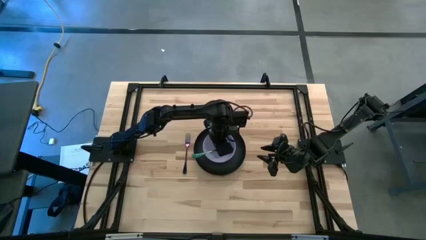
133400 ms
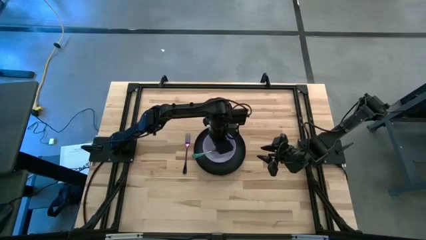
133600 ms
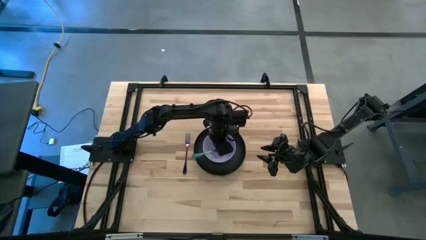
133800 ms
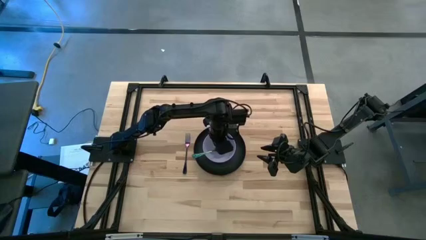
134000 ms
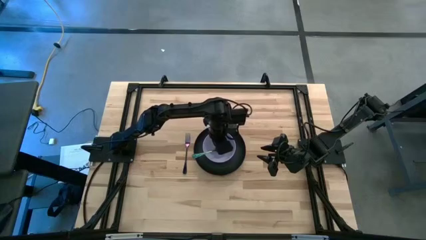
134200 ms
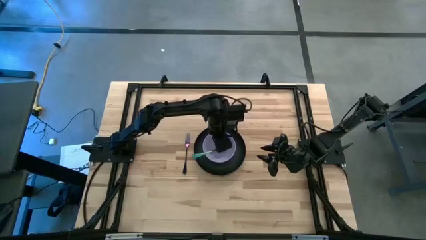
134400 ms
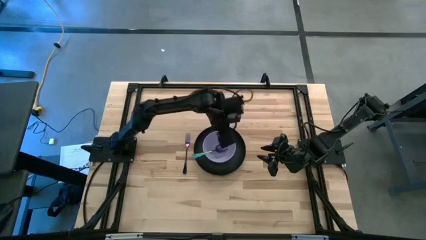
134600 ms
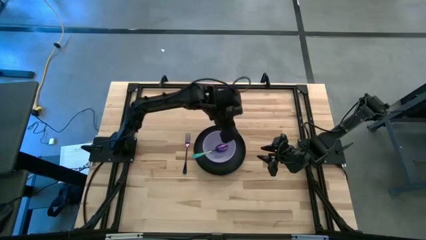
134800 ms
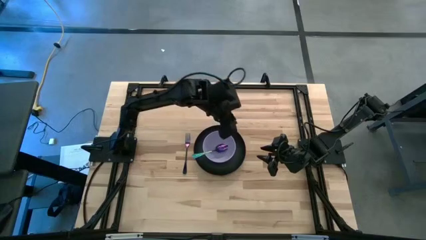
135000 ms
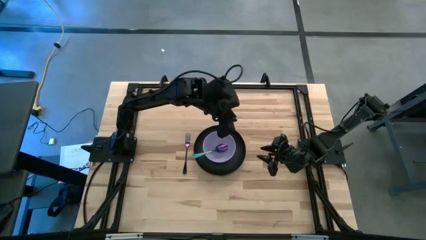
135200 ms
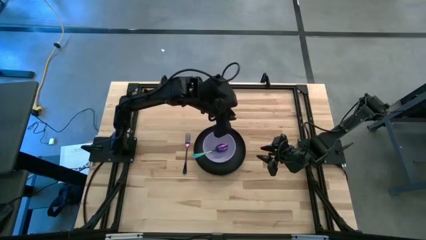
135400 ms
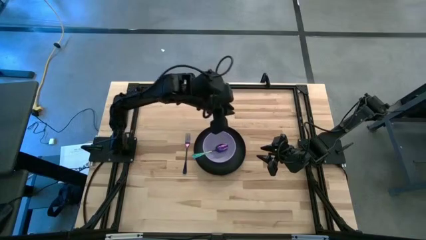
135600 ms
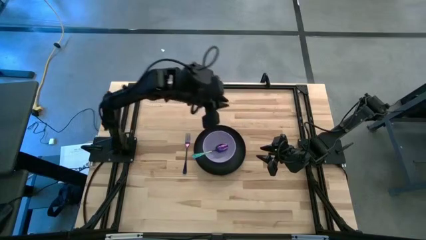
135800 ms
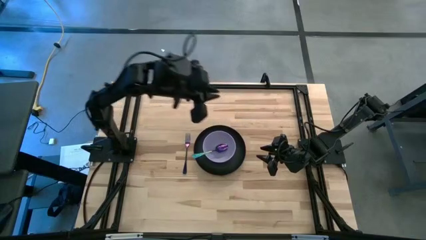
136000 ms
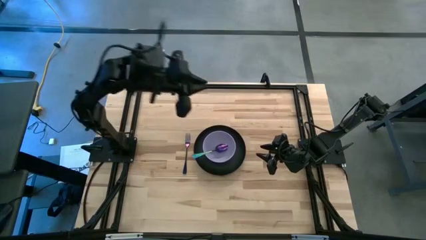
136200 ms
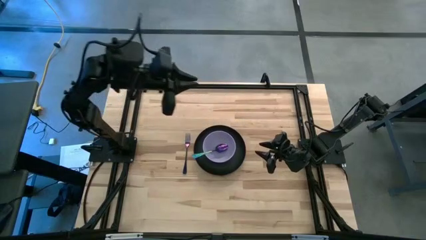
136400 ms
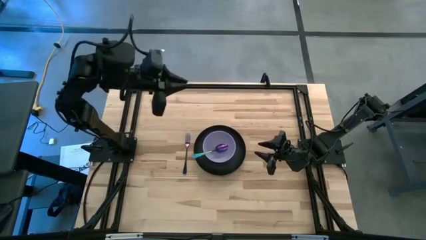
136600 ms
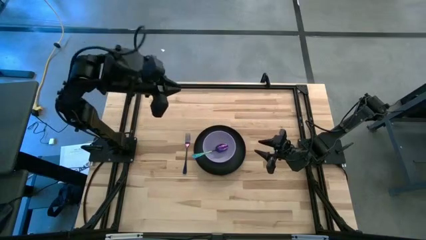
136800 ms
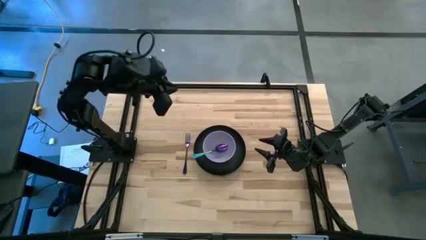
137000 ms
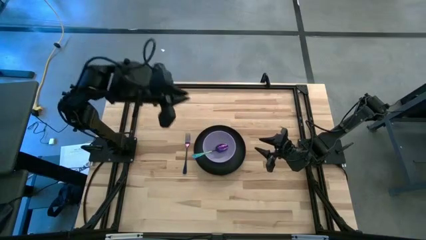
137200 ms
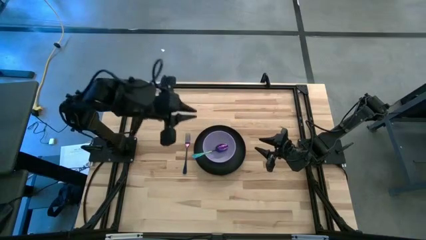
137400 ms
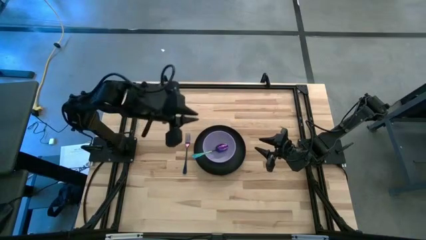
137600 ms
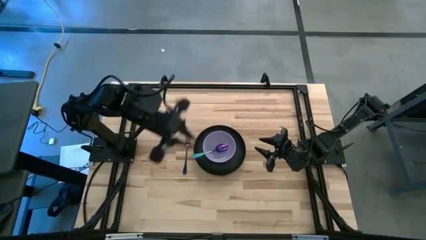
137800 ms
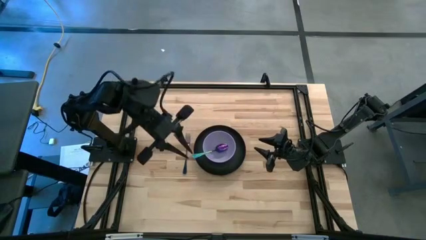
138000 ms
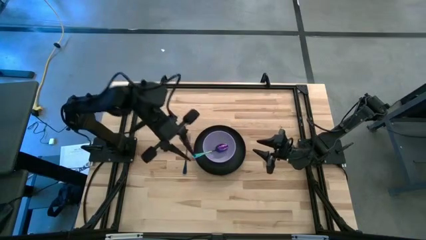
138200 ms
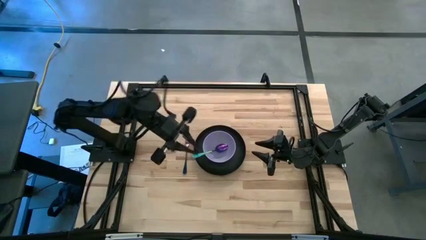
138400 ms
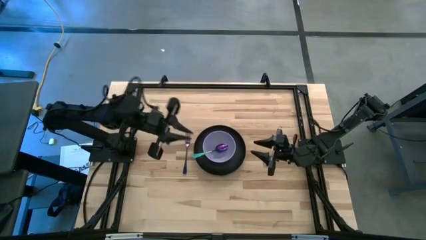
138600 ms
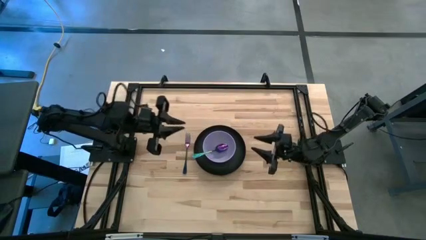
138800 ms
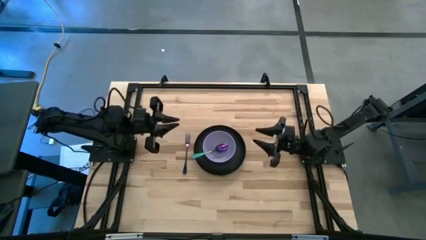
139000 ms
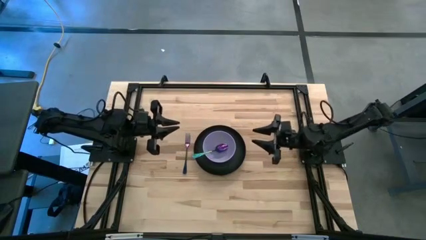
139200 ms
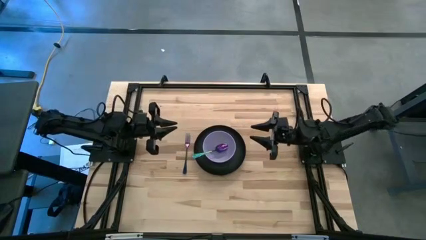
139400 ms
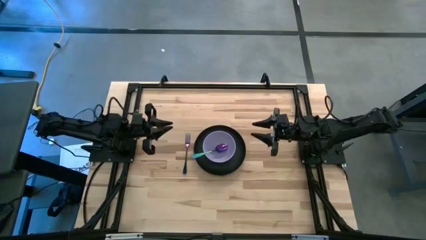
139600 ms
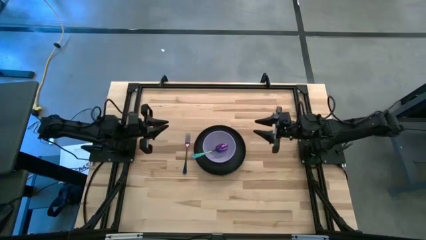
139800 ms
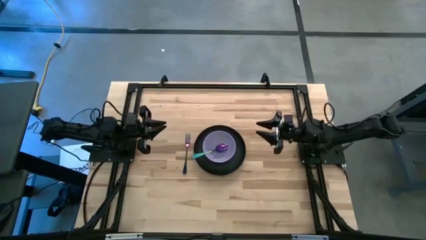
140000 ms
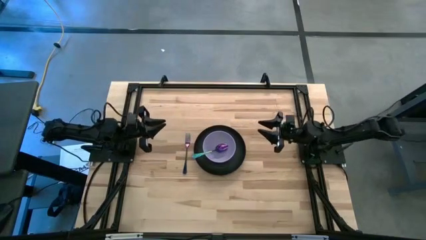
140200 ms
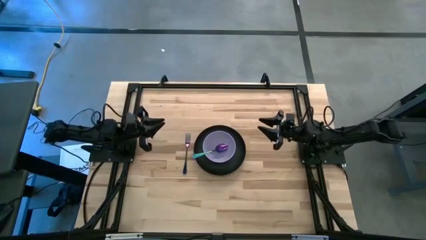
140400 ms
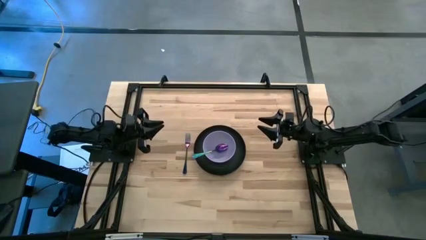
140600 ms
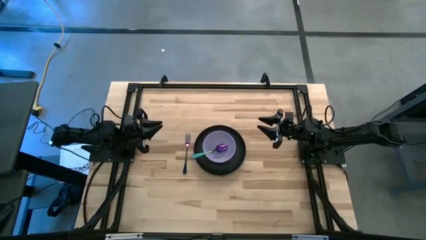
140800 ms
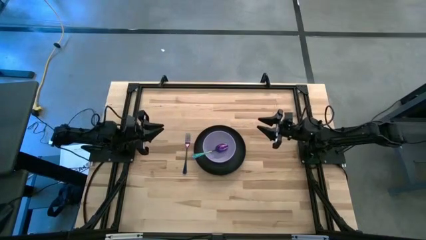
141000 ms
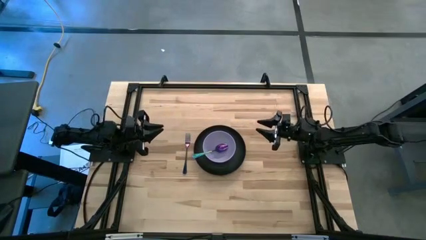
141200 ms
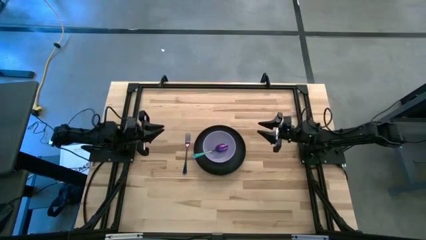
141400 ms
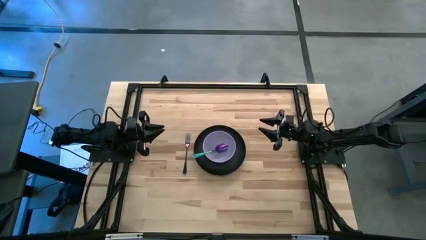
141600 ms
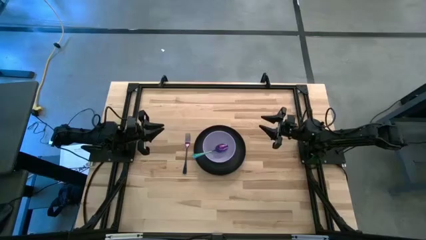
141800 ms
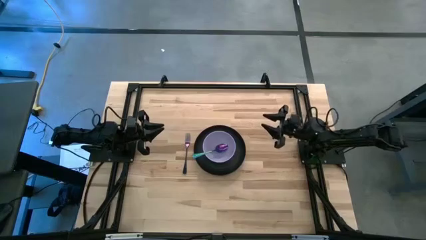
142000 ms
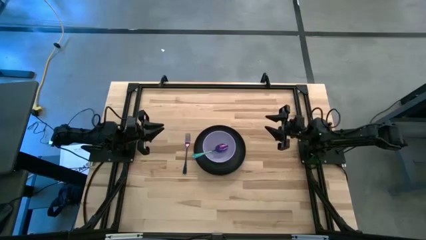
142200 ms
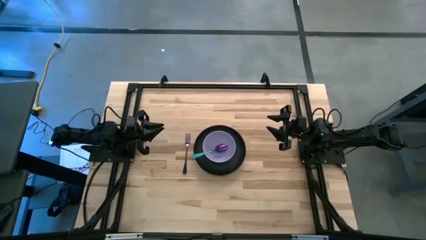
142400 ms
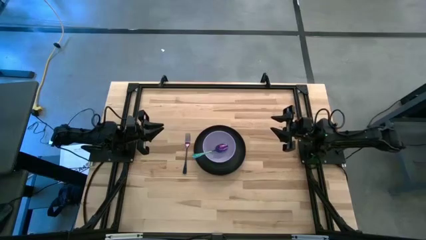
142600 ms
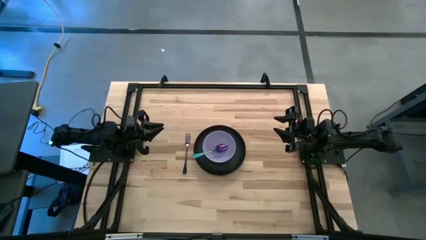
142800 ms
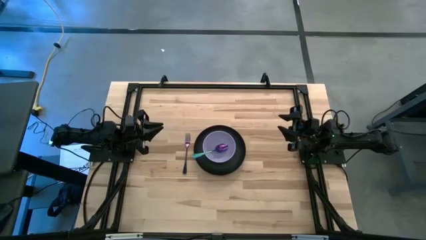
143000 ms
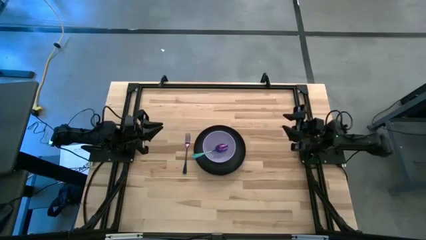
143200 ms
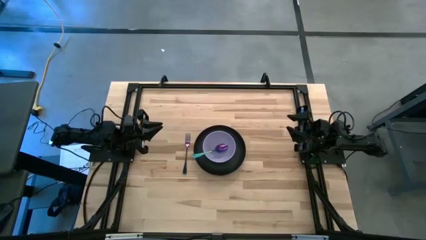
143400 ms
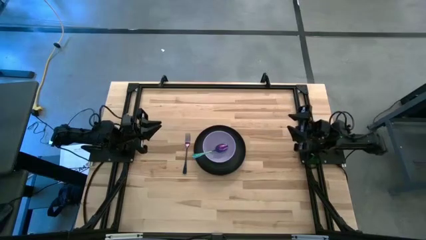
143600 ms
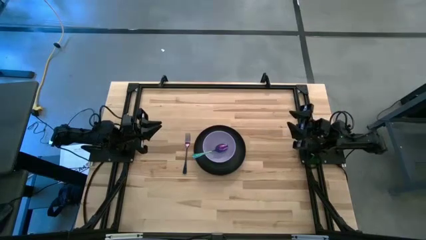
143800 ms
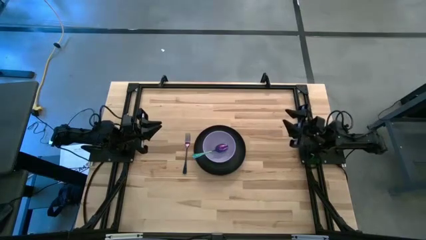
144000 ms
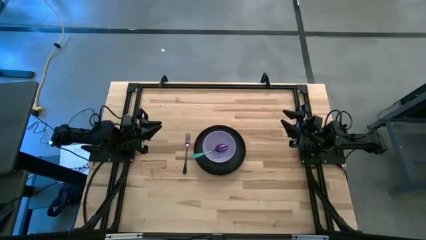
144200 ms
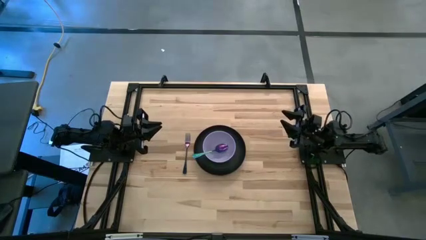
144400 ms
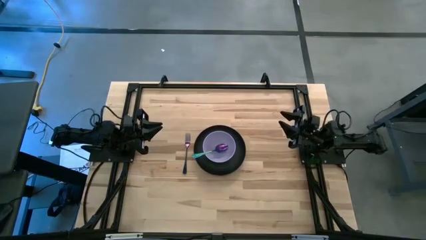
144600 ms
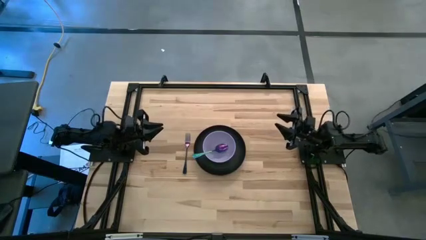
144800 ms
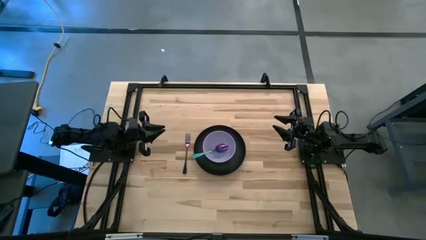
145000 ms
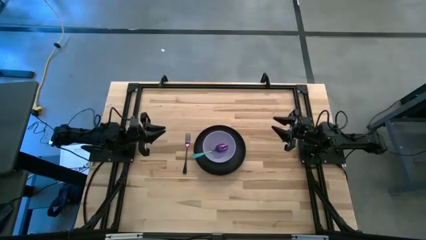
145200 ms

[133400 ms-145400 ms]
Task: Set table place
Return to Home Position

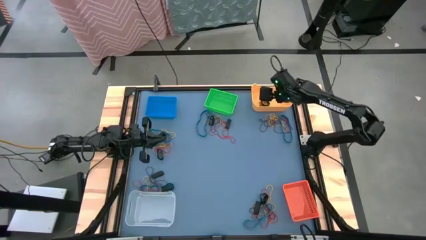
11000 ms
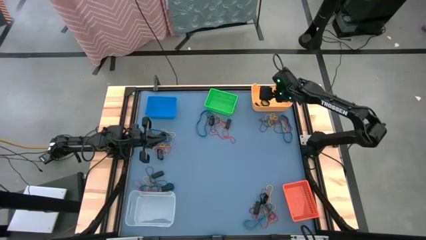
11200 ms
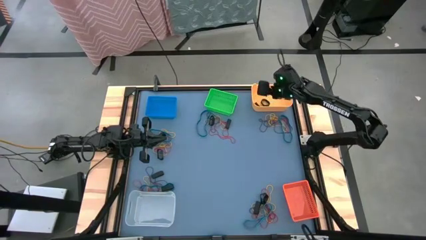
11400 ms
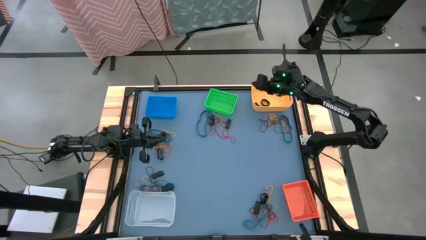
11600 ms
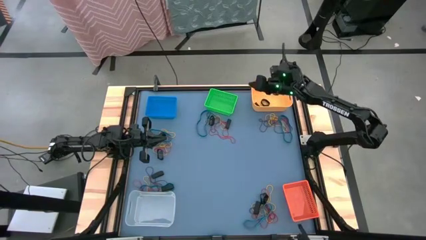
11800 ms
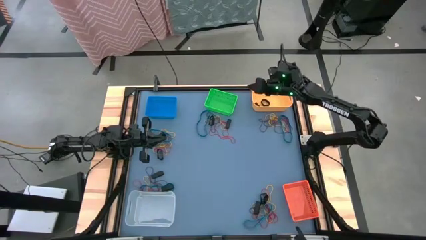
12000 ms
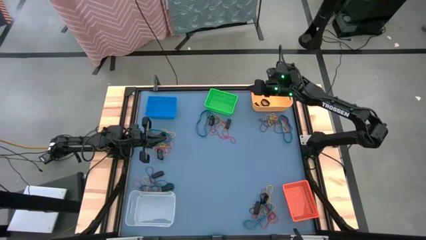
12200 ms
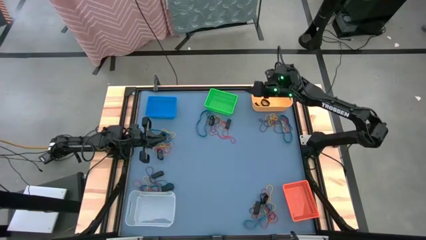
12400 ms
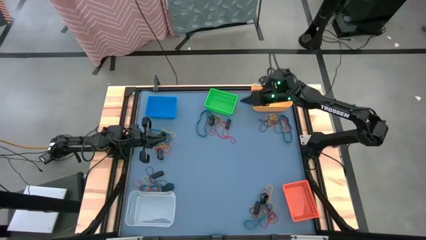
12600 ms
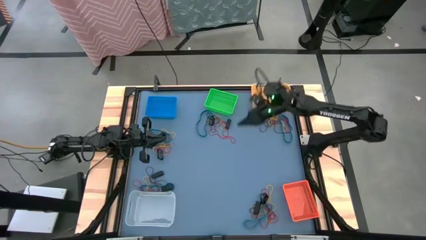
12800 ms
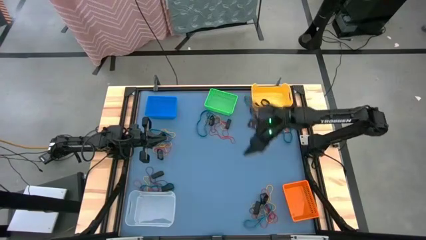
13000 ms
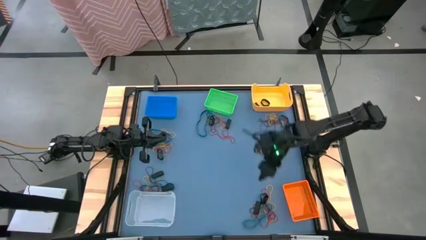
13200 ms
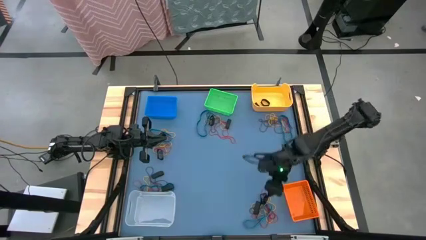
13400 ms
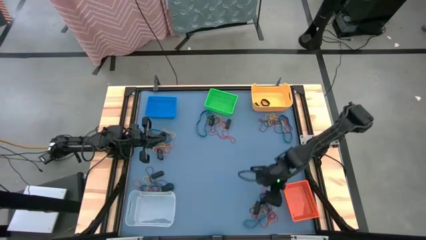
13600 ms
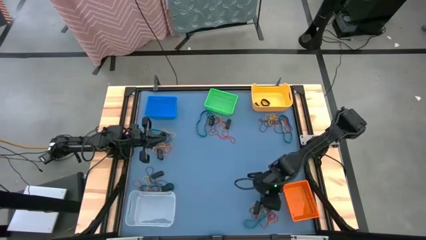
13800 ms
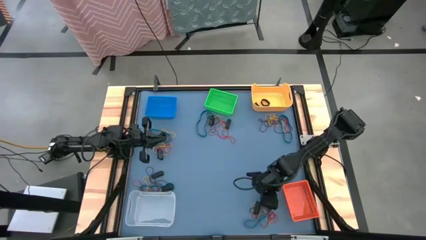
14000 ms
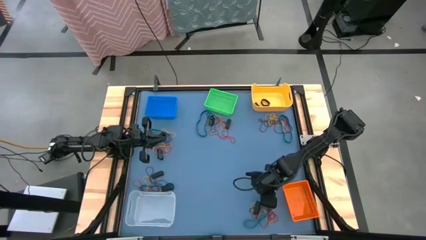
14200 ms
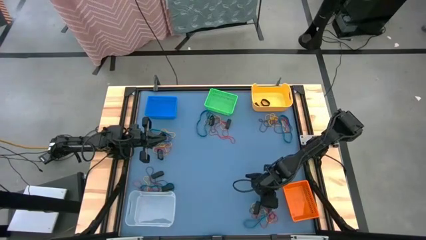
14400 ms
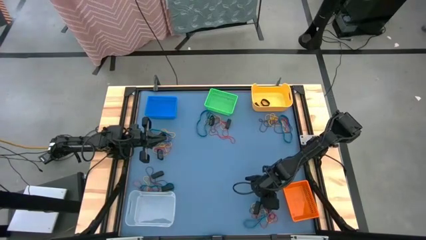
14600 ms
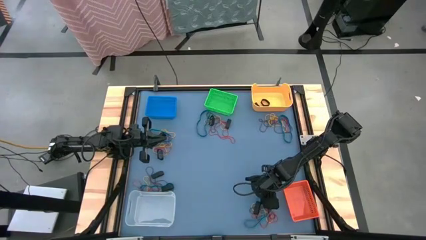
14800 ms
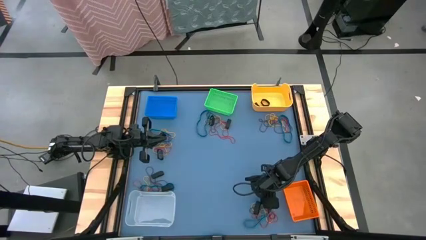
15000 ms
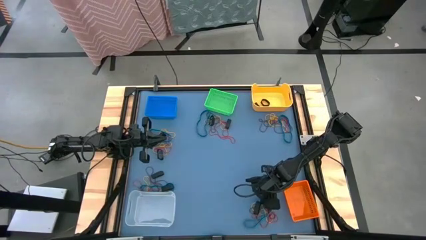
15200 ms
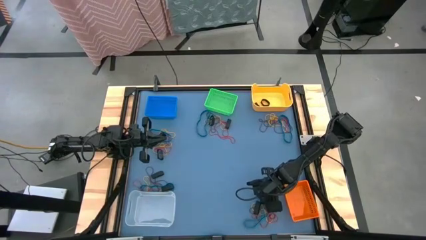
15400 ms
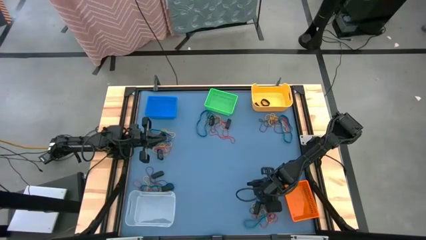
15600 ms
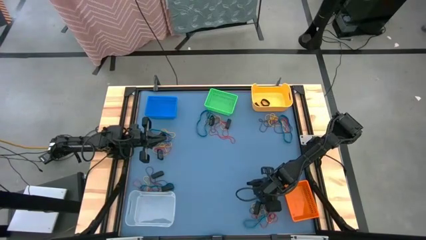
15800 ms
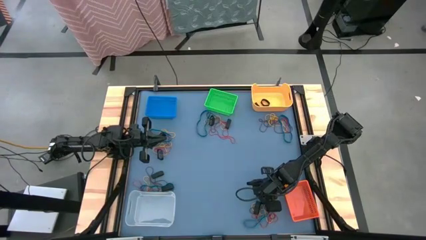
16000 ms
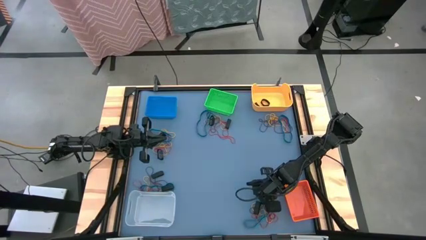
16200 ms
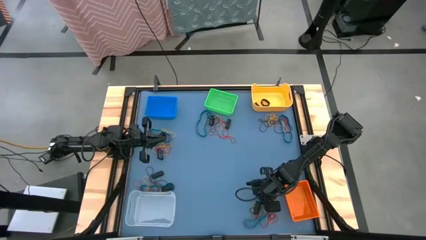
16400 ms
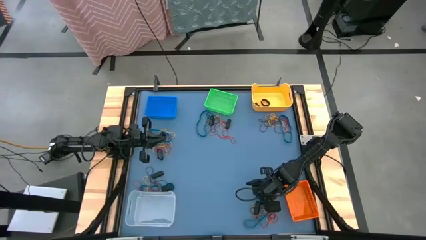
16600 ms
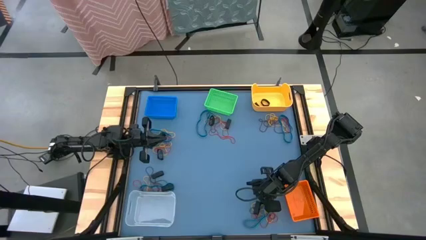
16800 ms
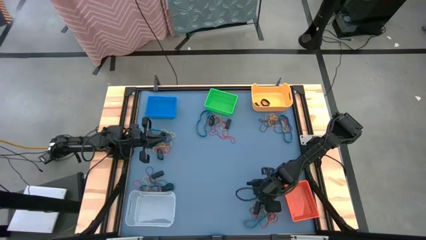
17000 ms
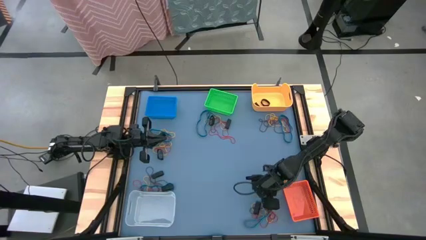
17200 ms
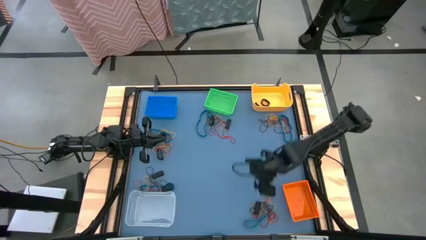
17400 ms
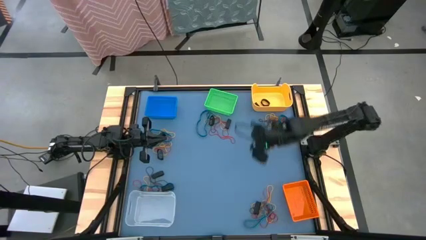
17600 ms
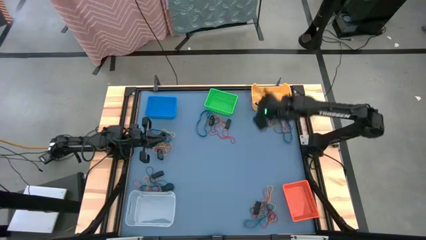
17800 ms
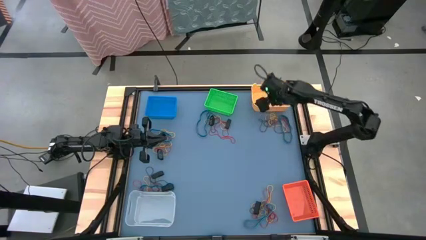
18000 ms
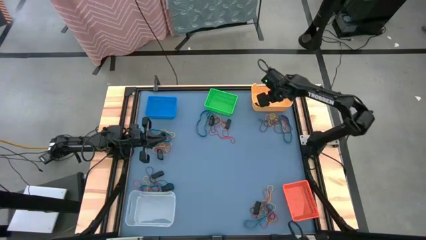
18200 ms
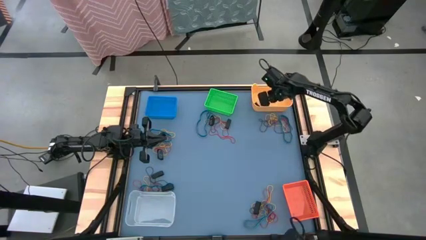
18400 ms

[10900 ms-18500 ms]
Task: Sort rubber bands into baskets
Put the black rubber band into the yellow bin
